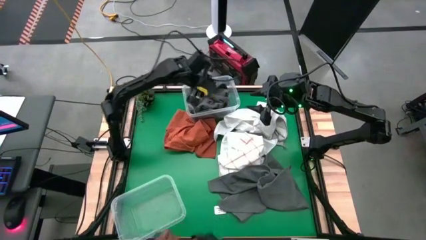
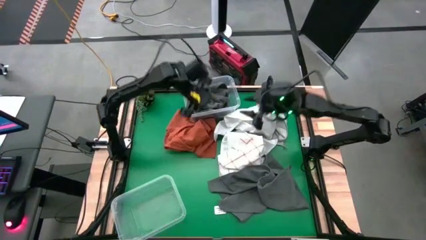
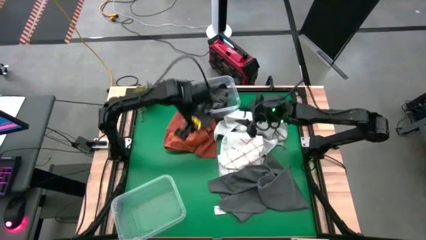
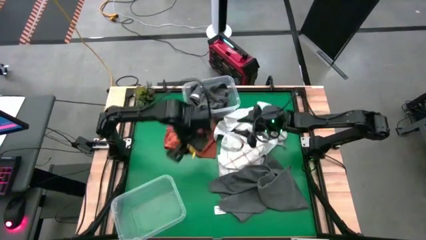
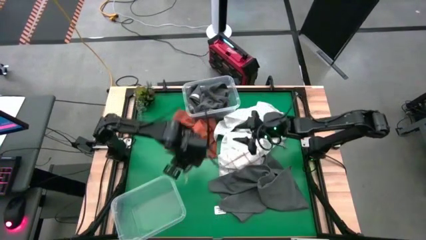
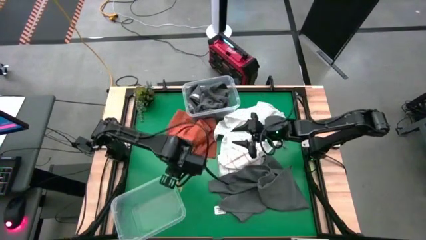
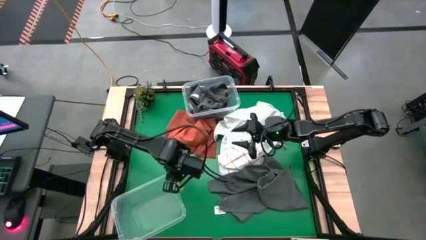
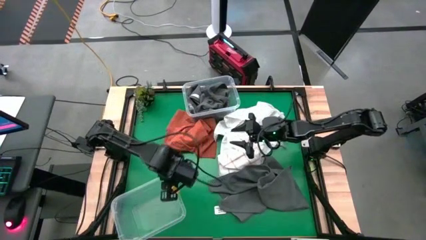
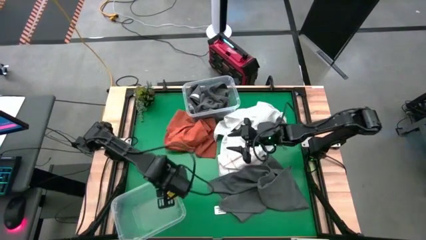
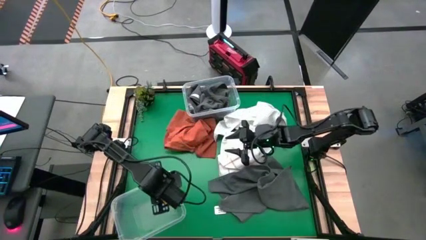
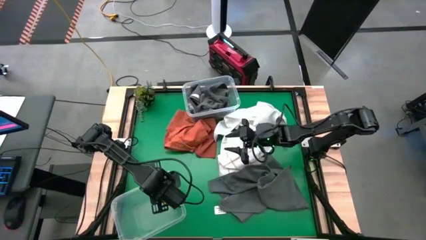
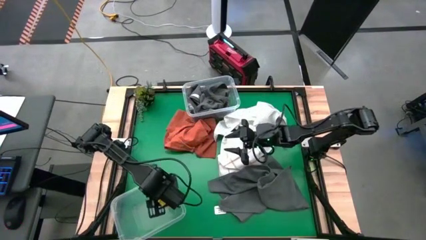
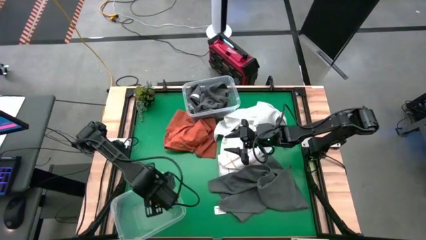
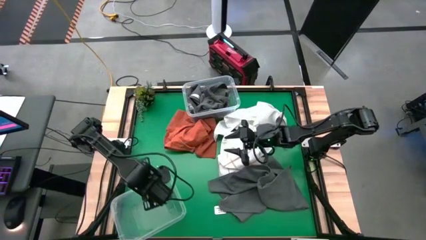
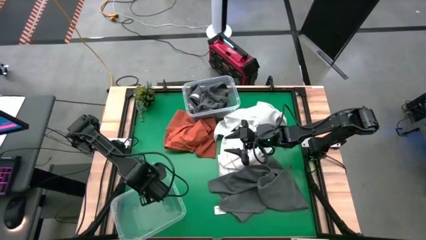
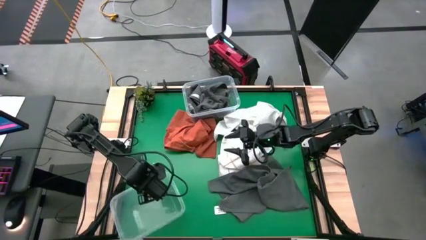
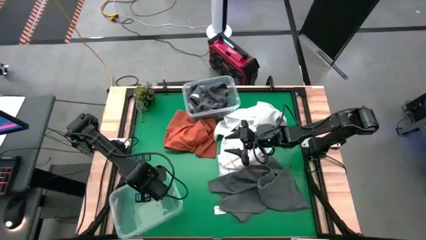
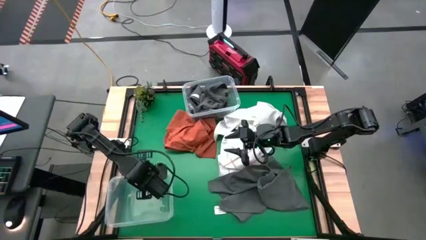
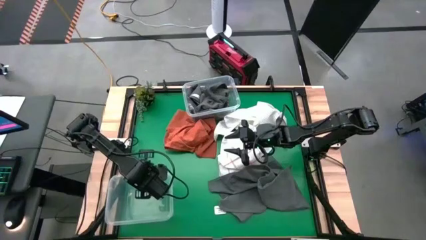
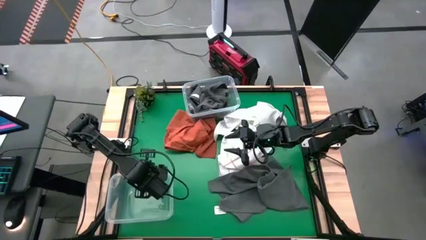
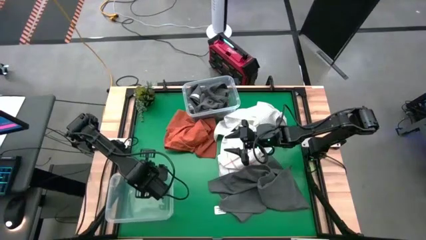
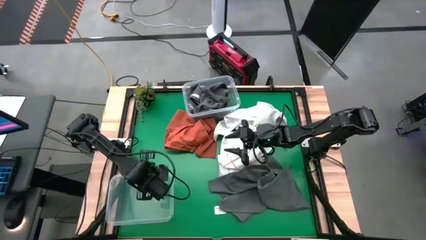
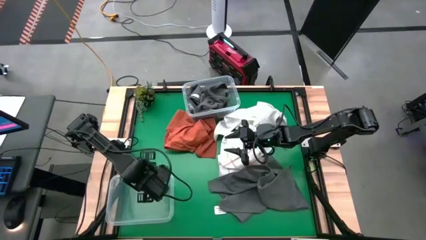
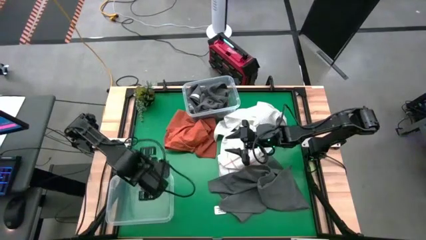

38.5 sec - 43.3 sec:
Task: Sort towels by color in basket
Adjust the bottom transparent bin

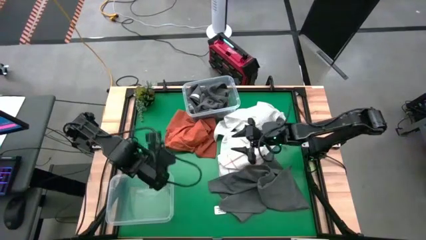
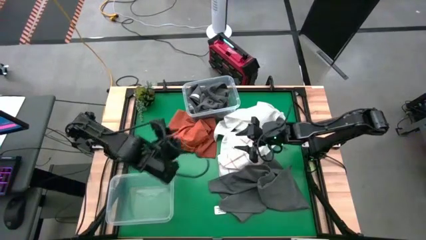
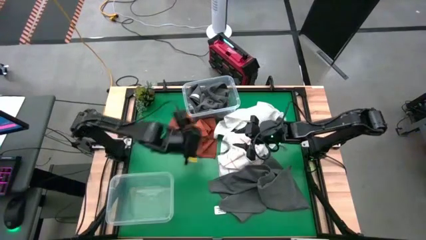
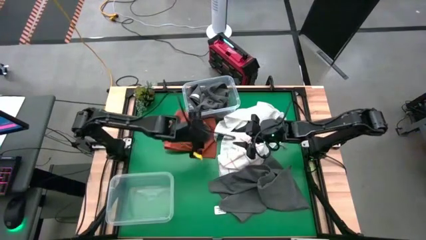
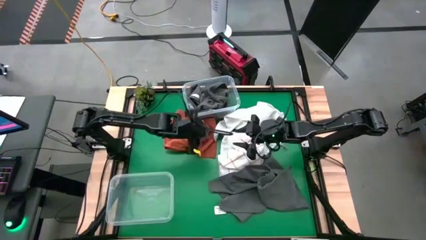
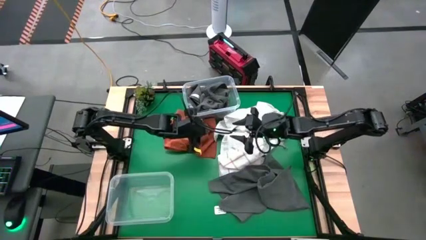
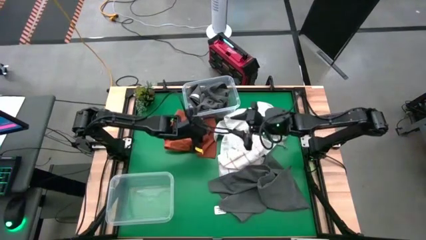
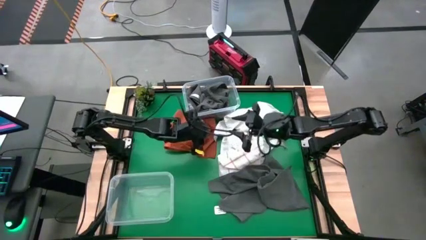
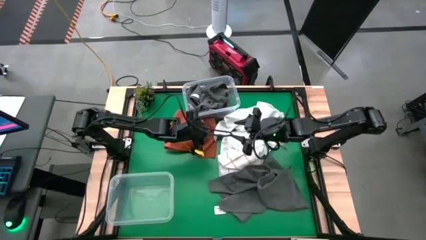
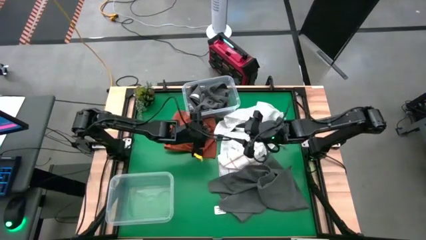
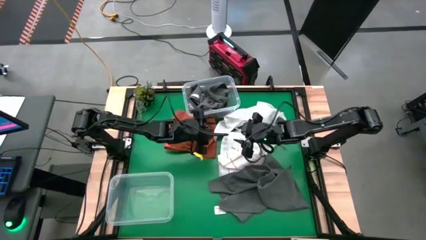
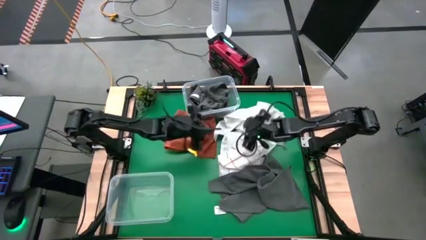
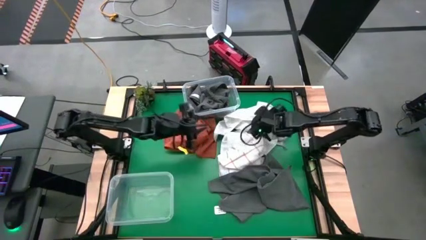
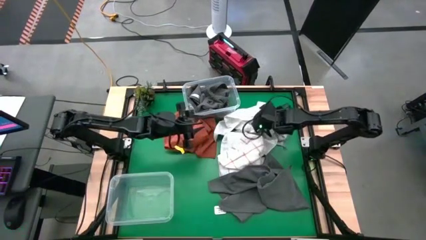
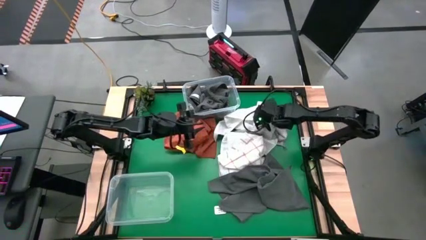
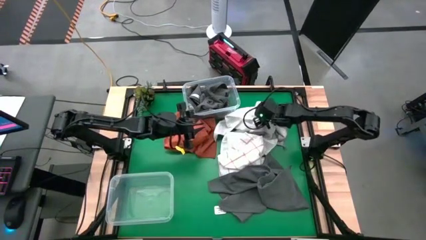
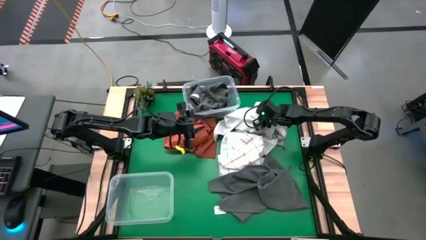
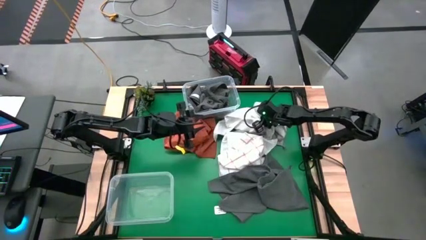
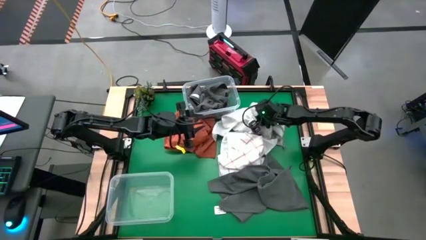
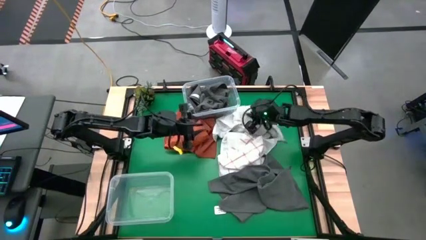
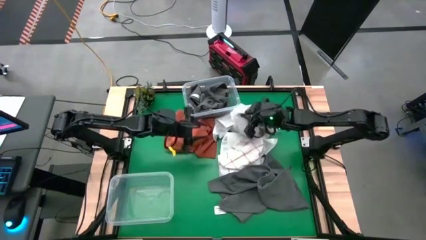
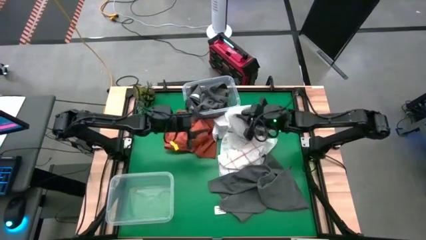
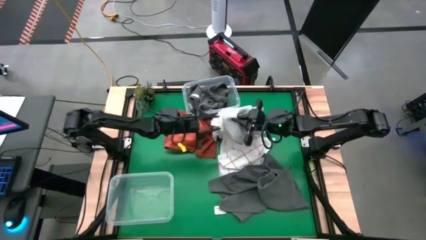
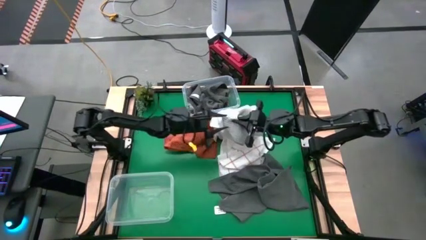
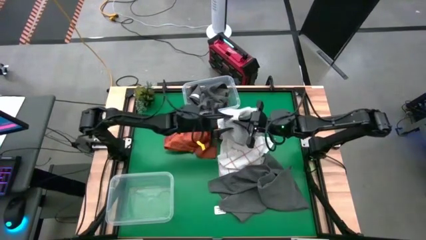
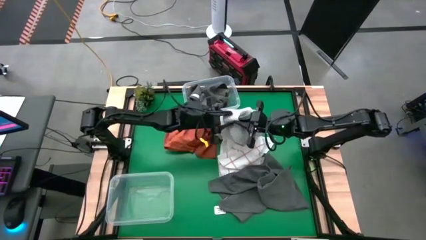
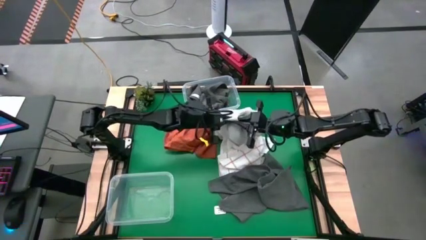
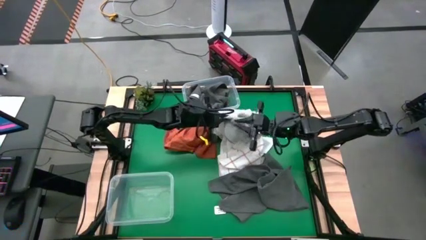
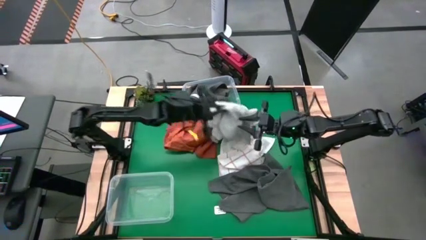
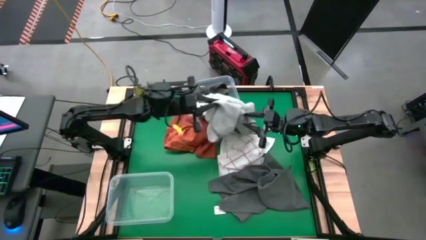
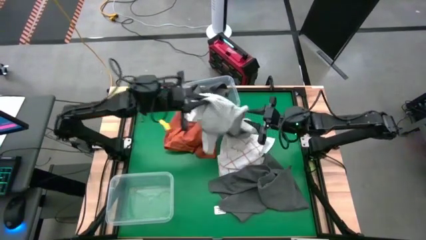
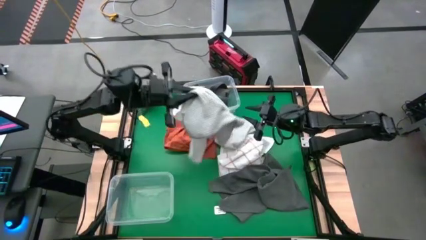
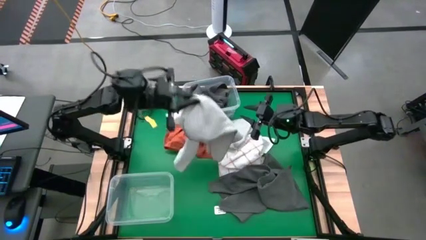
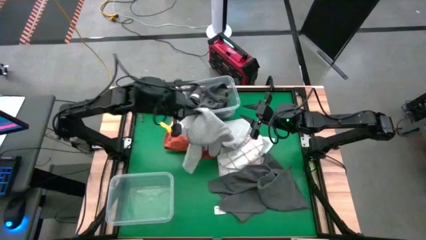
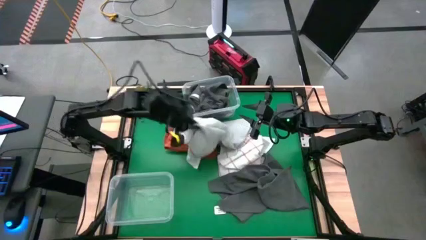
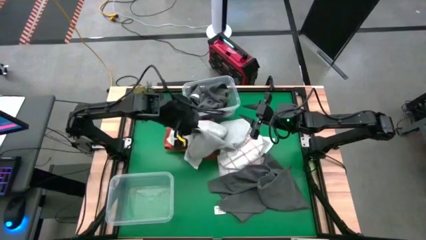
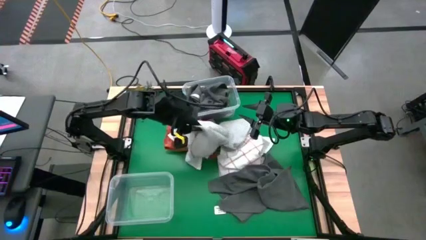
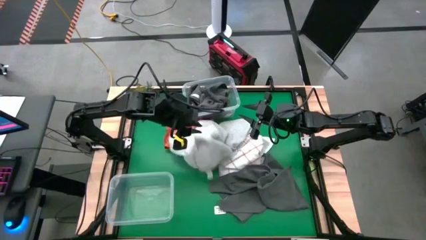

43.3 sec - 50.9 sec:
Put the top light gray towel into the bottom transparent bin

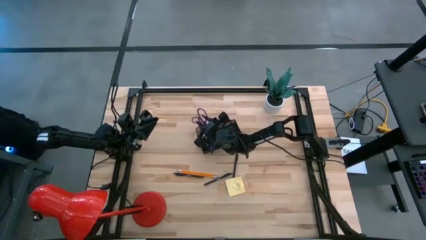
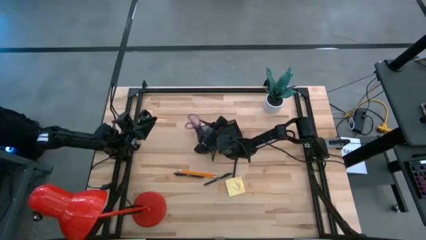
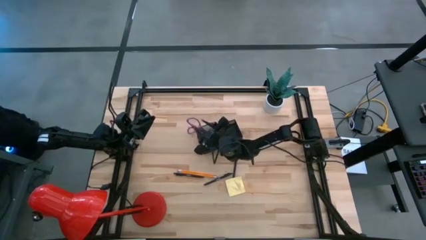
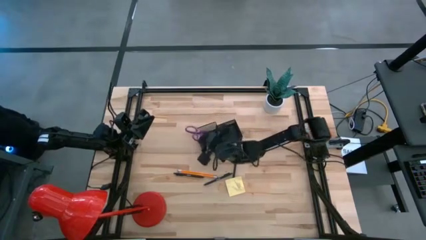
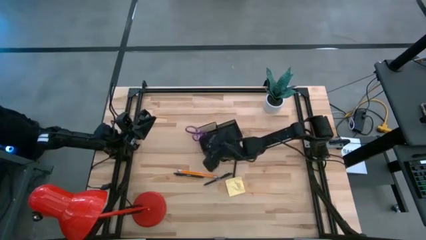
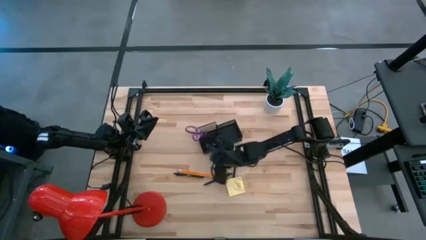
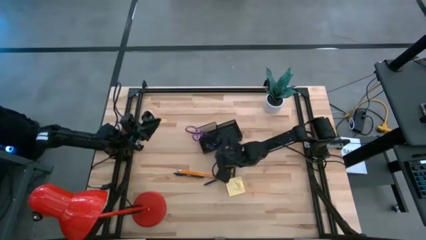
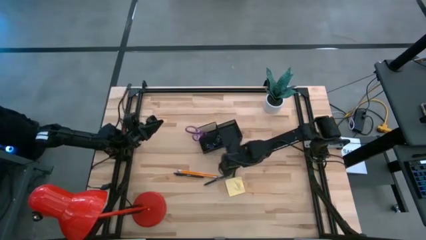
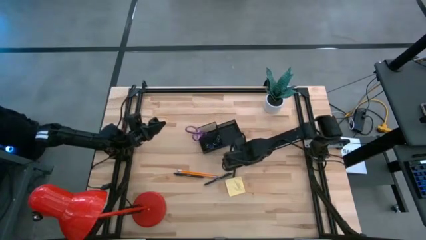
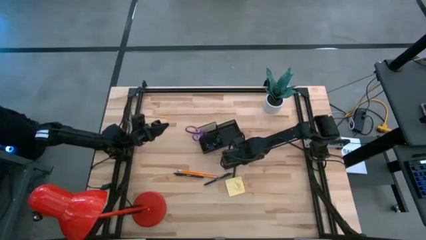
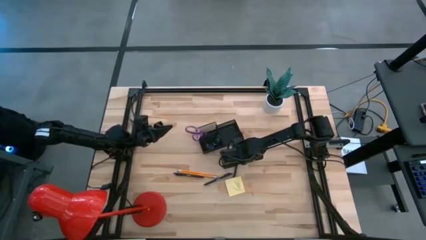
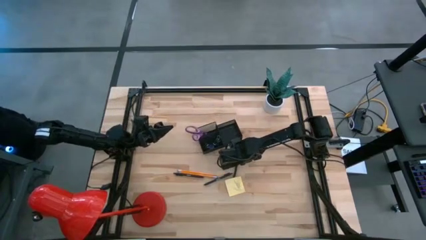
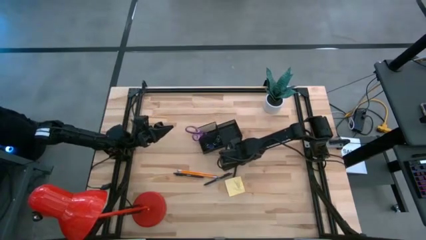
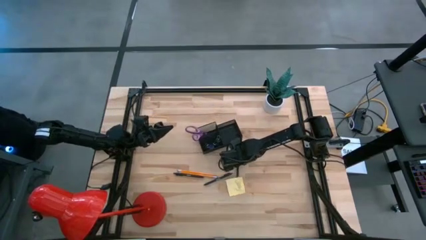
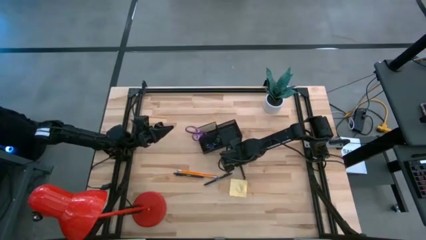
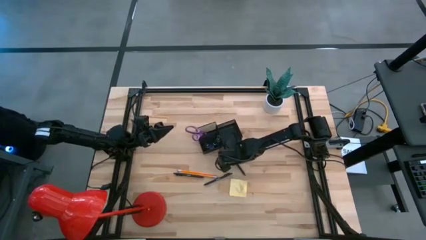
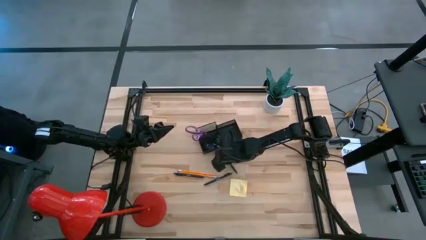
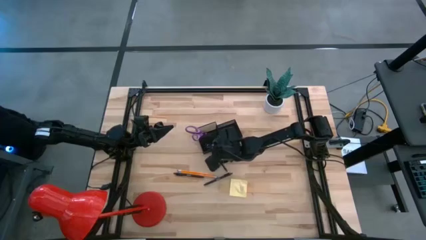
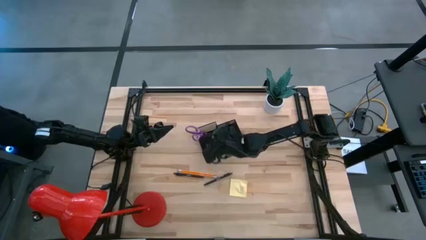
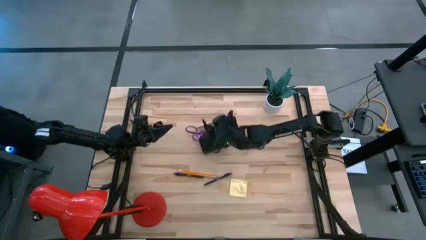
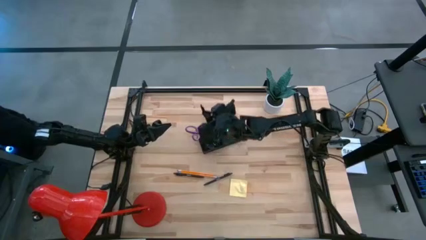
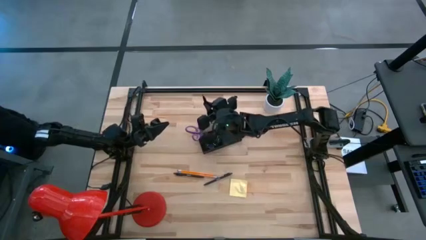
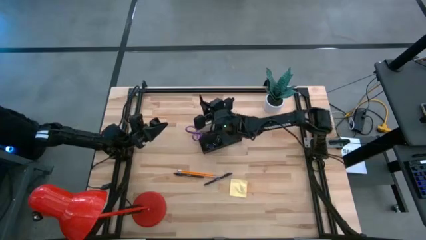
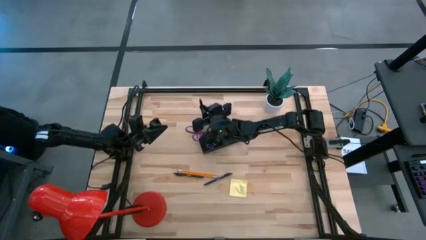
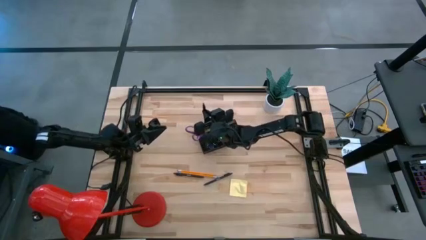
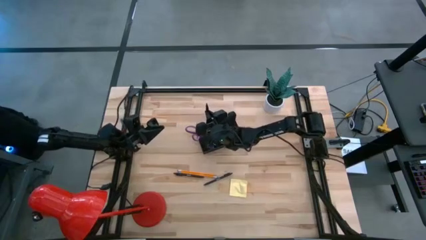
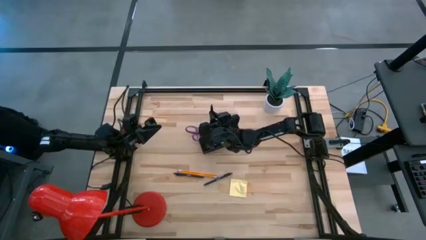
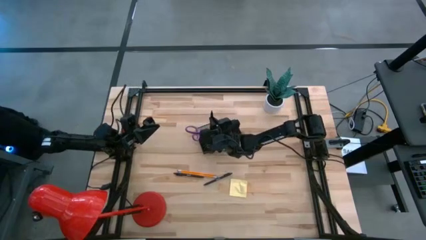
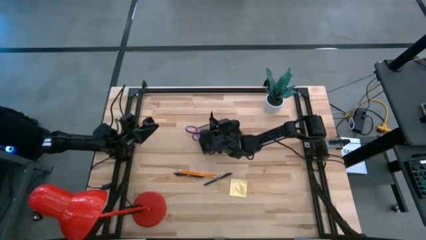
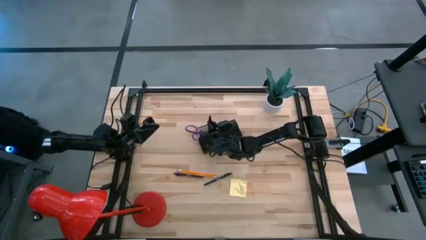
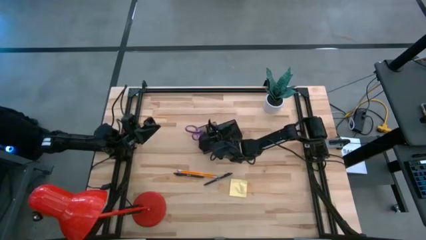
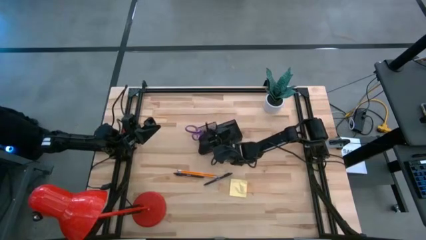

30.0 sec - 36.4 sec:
Task: Pick and place office supplies into organizer
Put the right black ballpen into the black desk organizer
